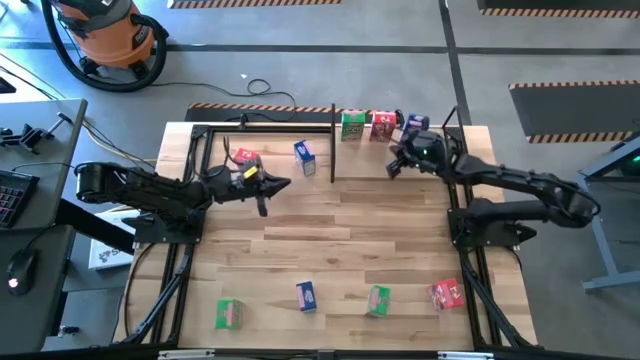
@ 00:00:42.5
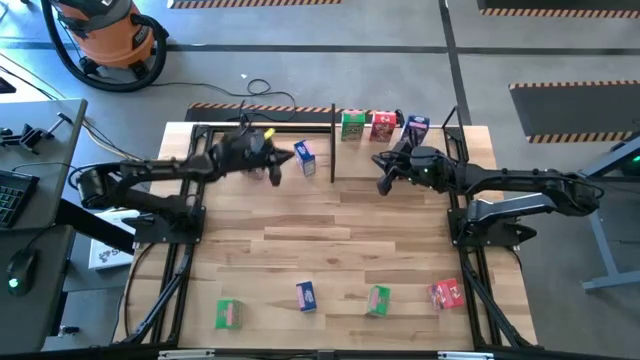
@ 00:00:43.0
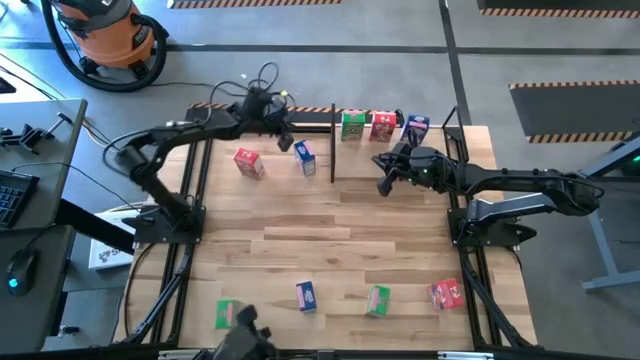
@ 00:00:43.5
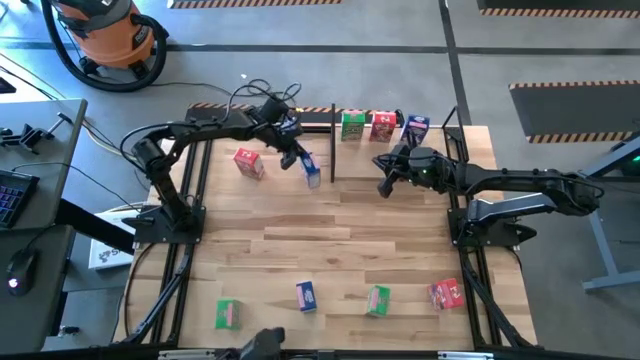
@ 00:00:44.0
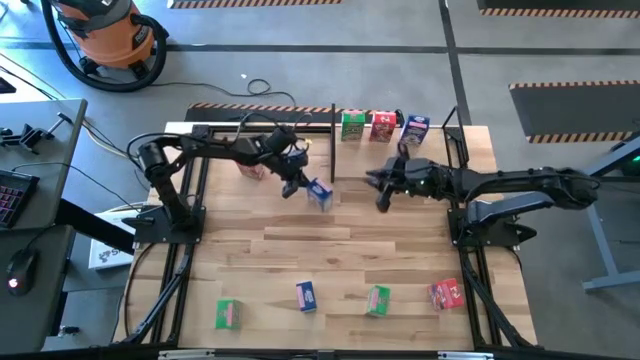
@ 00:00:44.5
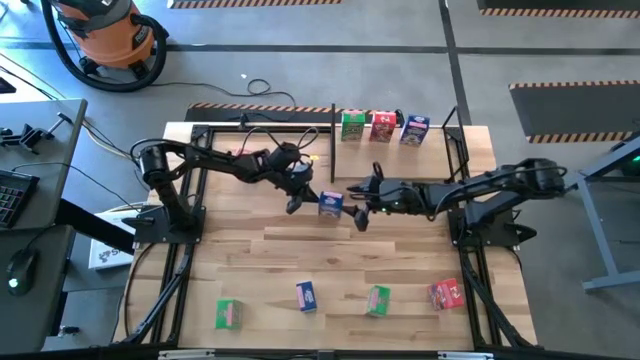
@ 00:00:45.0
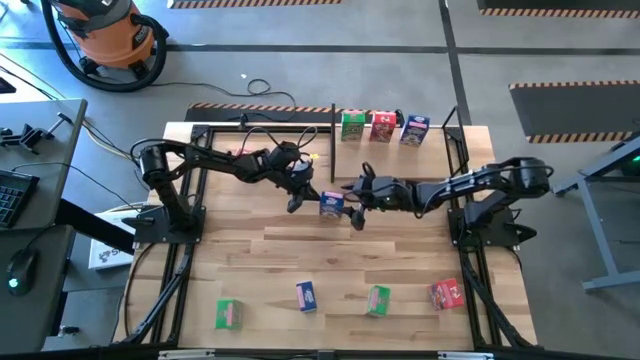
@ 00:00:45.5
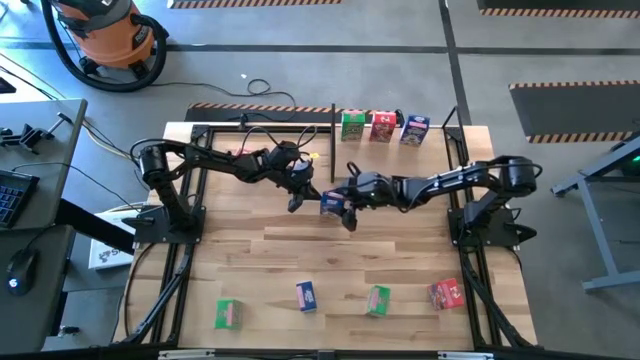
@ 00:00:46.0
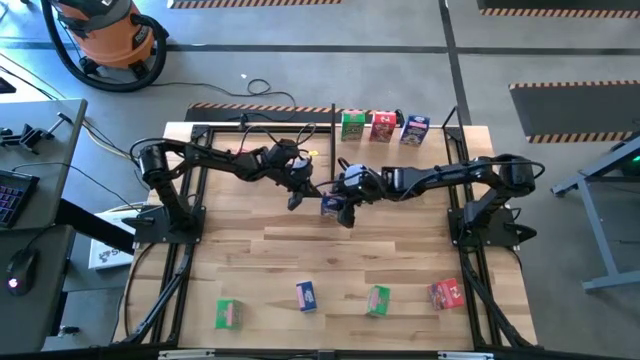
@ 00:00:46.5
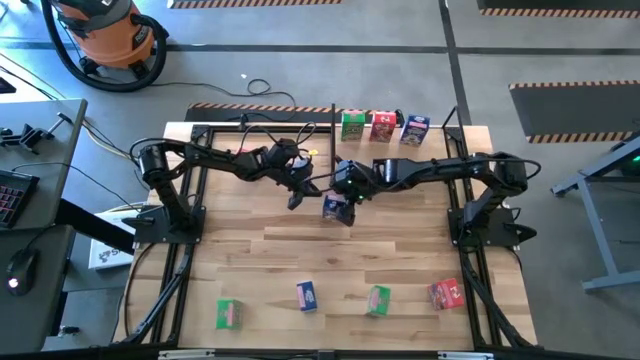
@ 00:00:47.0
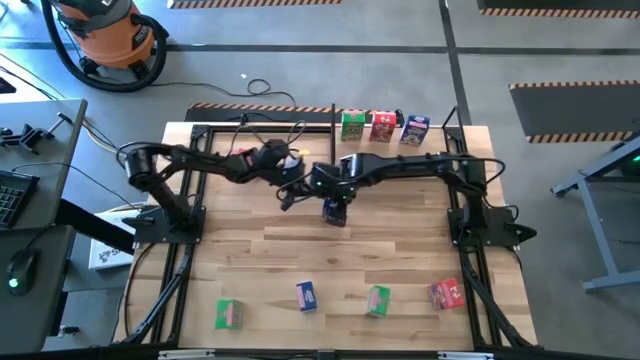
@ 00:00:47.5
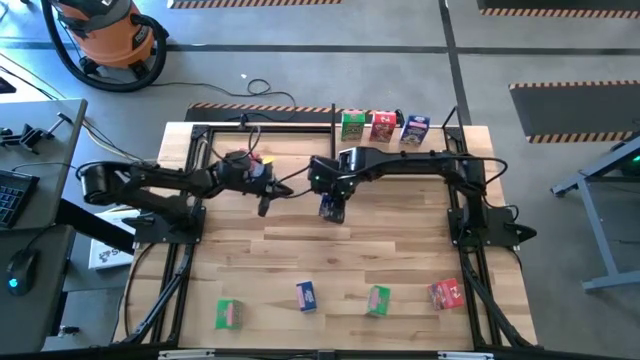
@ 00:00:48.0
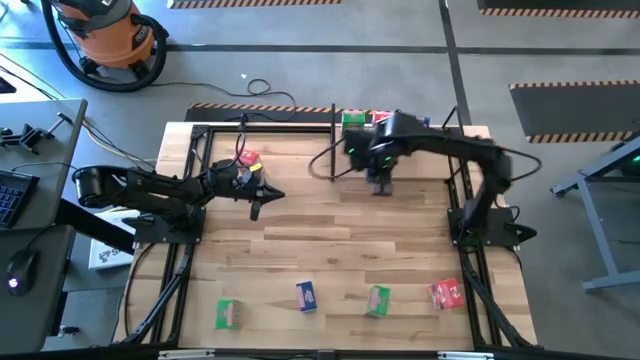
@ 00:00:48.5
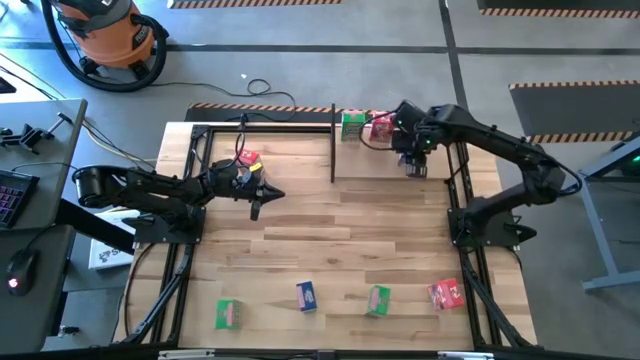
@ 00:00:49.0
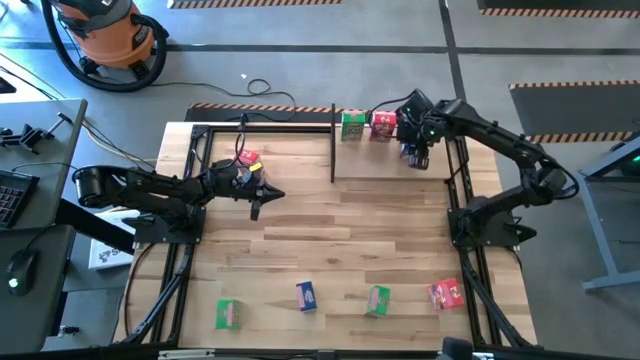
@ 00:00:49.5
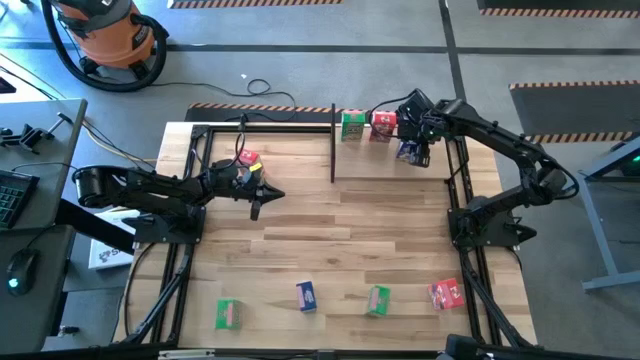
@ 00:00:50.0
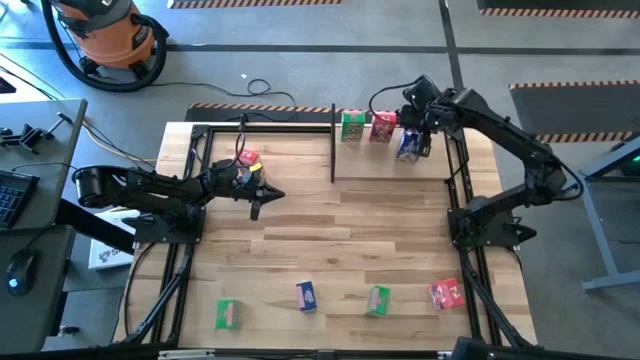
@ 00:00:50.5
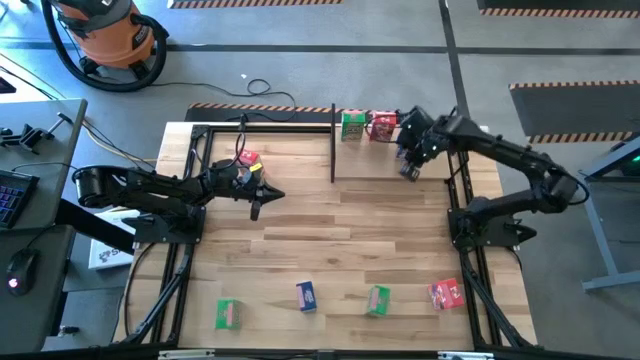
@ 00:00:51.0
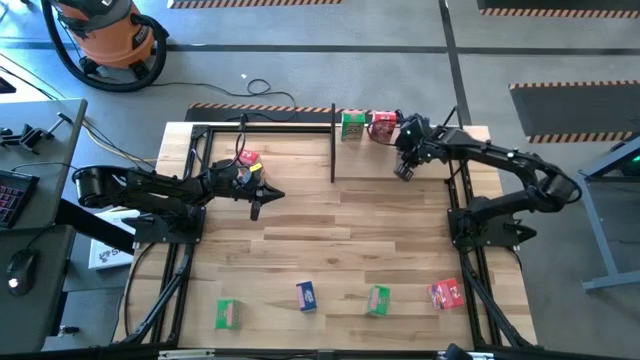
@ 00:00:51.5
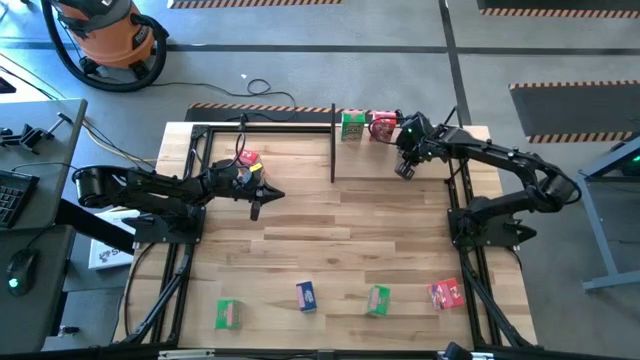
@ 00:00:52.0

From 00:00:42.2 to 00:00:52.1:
Task: Stack cereal on shelf
Put the top blue cereal box on the shelf

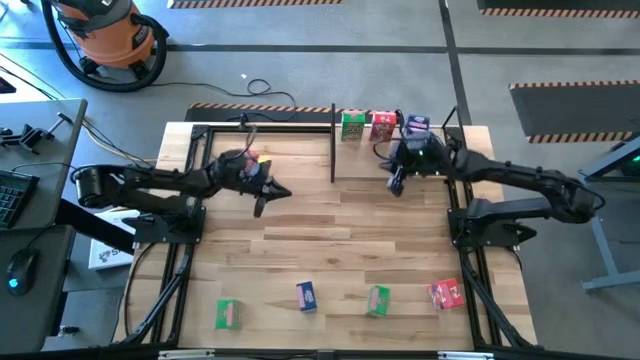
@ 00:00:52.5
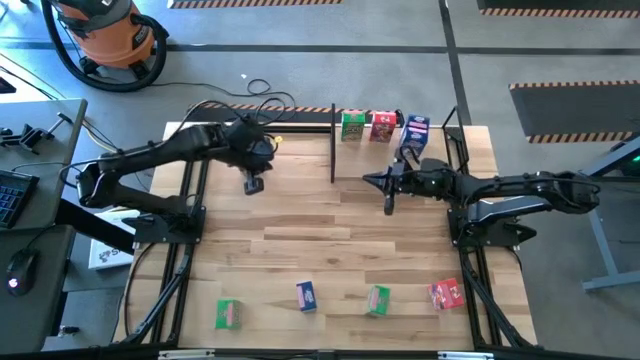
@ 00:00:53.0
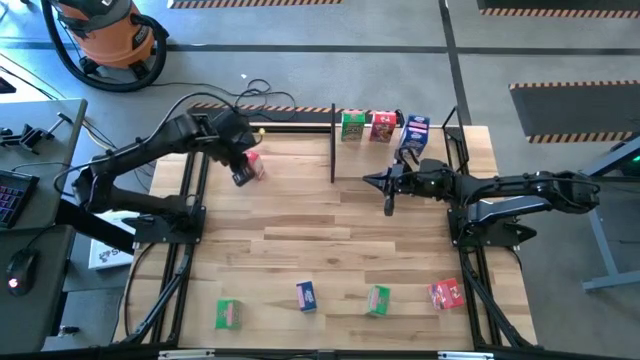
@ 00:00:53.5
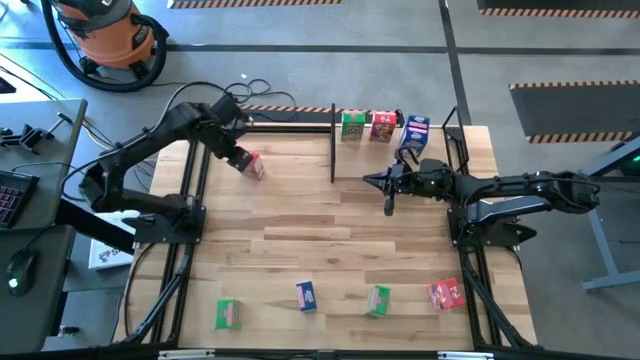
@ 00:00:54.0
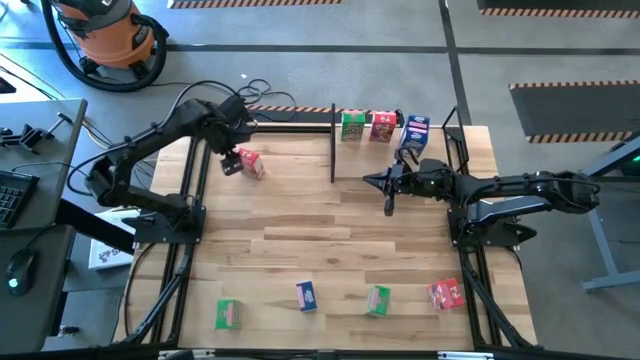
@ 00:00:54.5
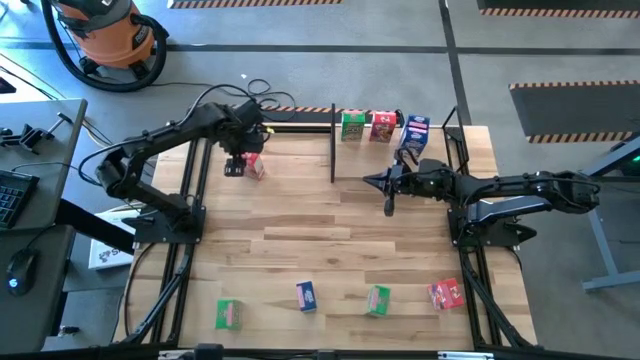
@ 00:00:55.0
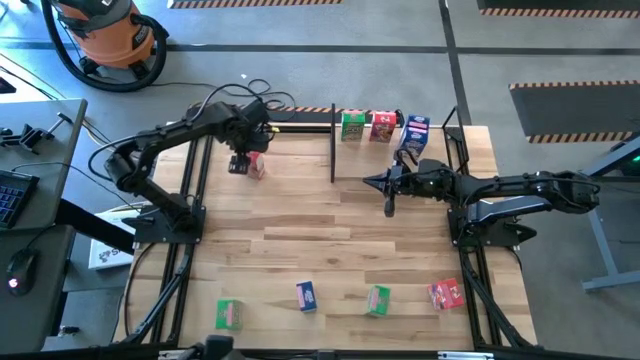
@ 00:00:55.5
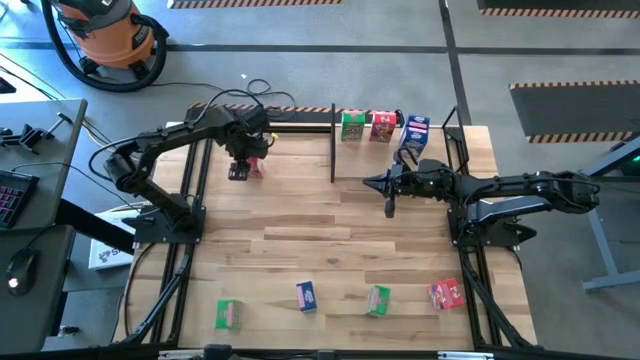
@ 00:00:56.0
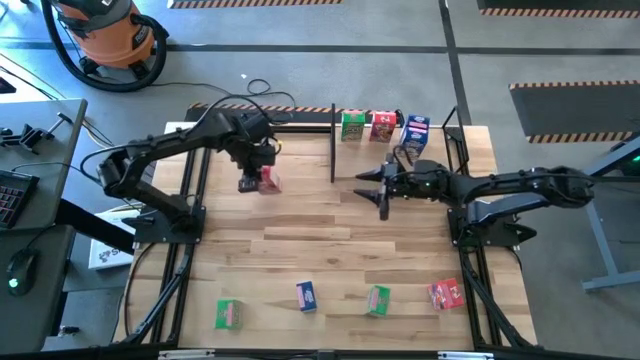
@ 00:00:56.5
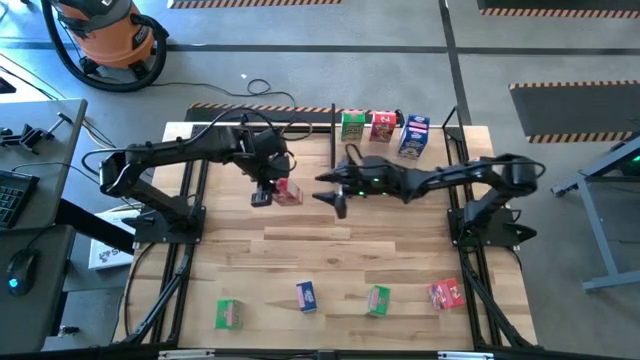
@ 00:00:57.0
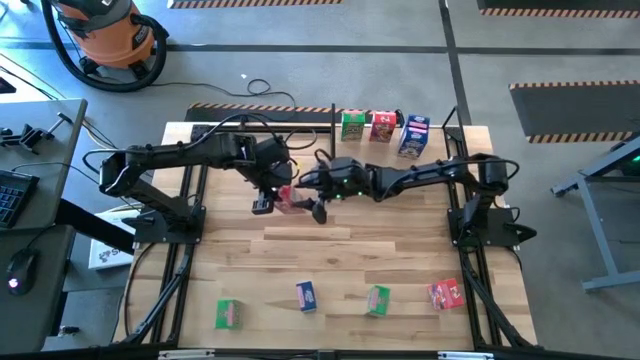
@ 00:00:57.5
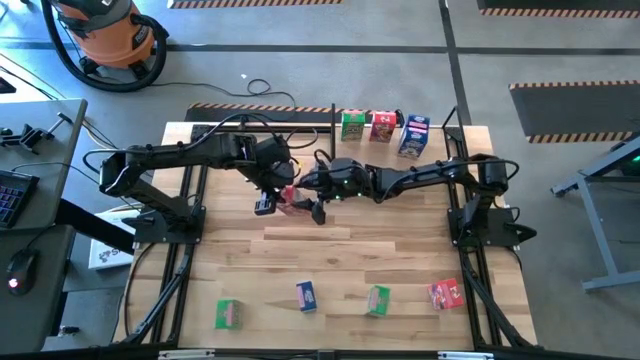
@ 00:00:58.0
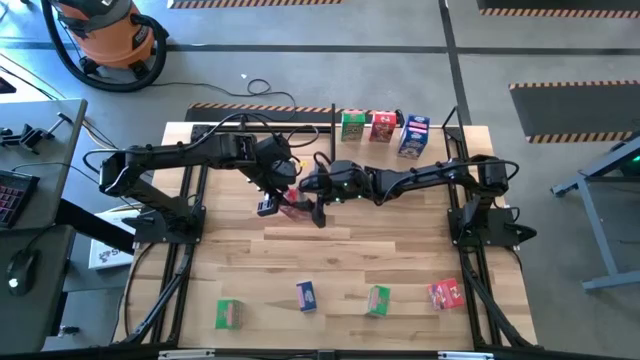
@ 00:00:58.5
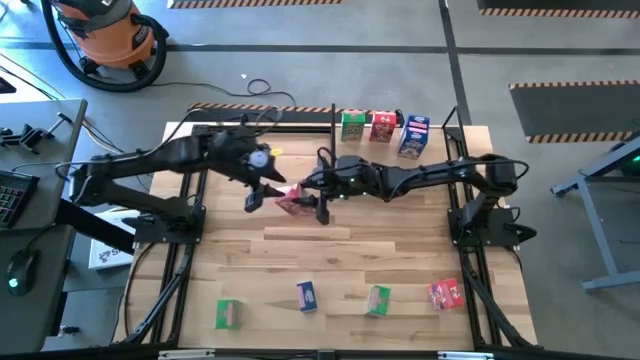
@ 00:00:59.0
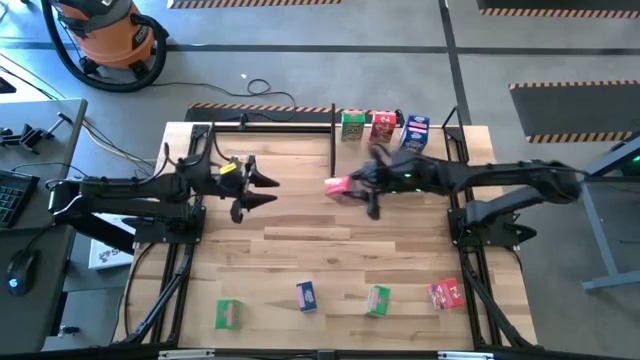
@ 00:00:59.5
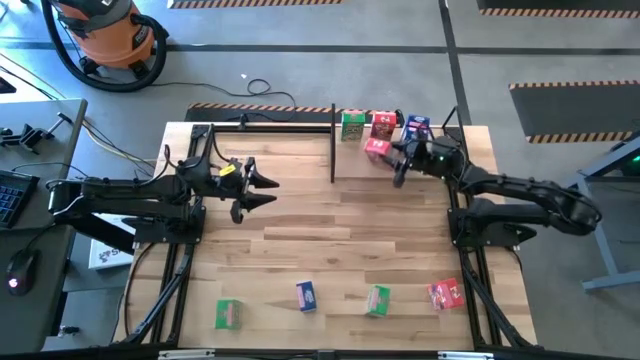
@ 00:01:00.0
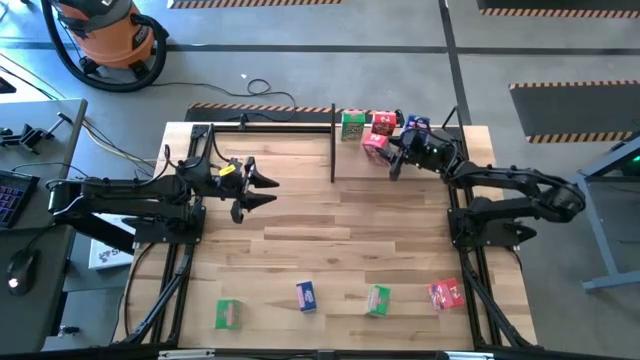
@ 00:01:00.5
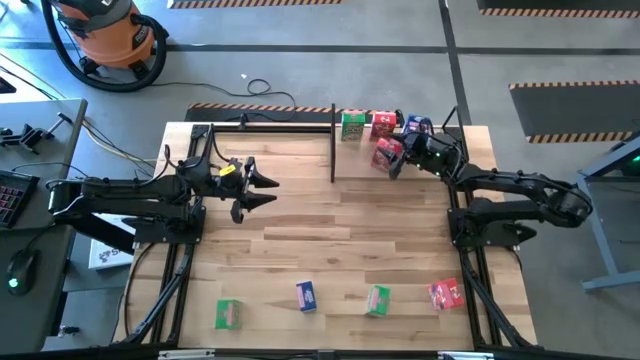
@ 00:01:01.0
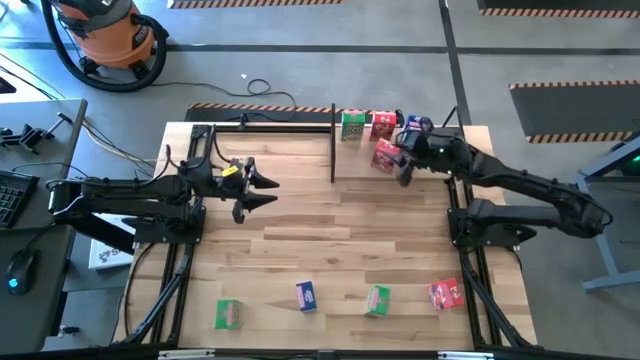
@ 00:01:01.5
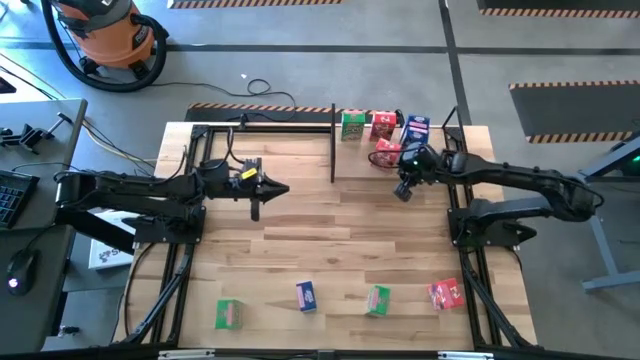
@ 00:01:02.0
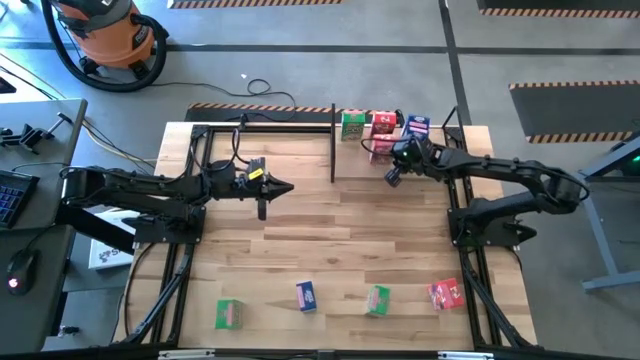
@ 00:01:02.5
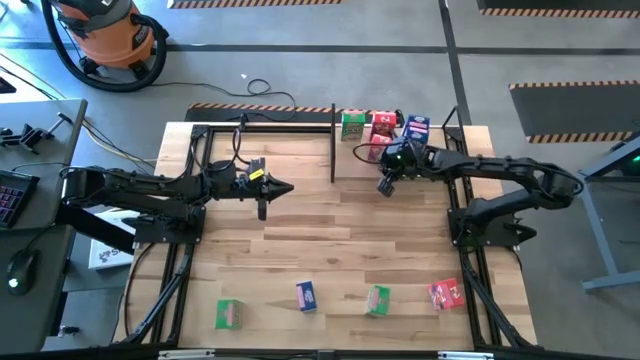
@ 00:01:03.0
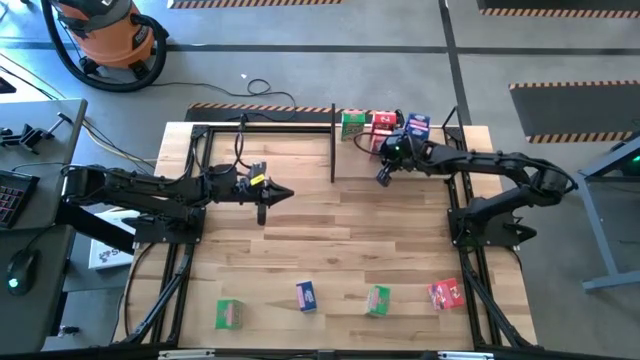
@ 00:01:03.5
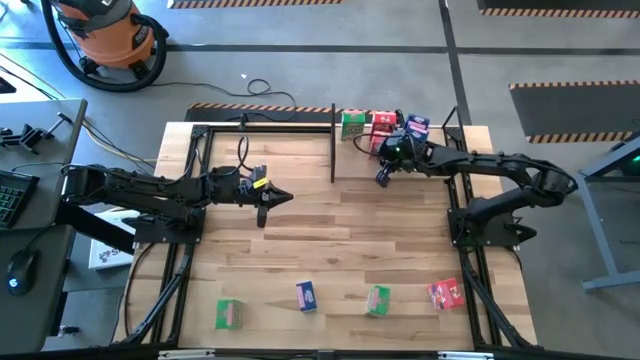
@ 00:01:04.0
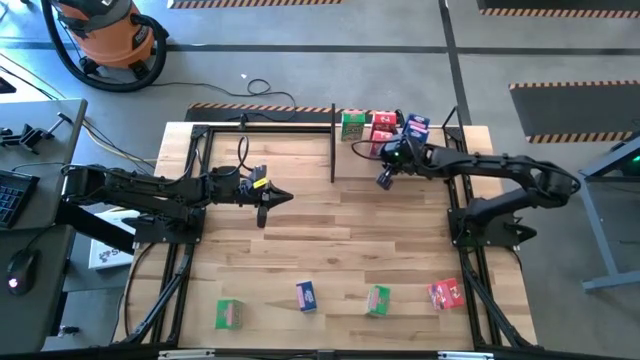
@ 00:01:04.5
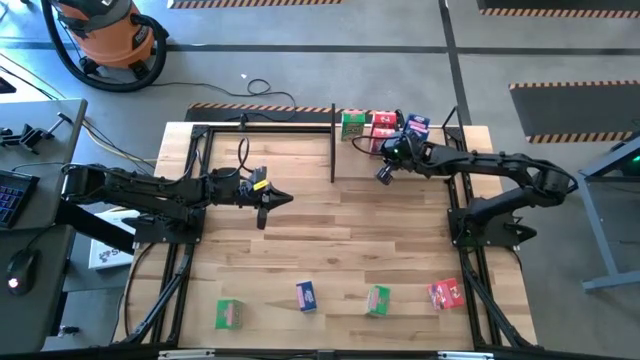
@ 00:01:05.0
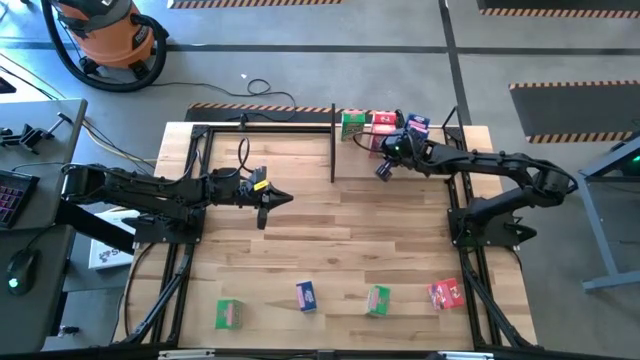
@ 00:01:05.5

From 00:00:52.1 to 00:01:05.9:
Put the top red cereal box on the shelf
